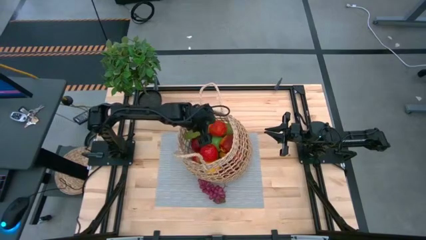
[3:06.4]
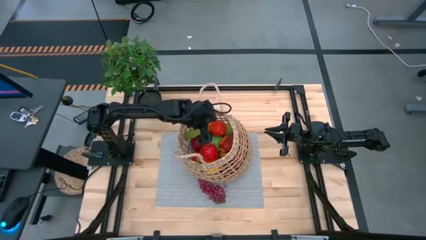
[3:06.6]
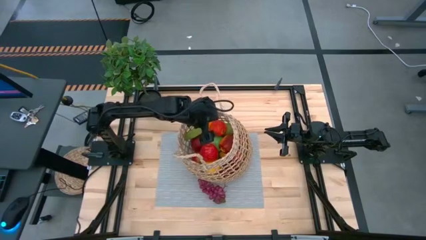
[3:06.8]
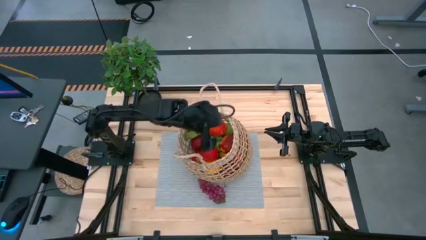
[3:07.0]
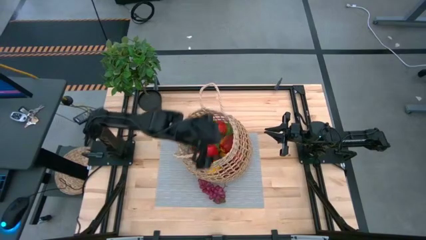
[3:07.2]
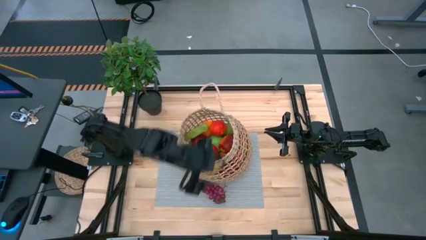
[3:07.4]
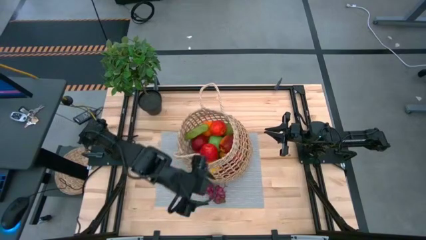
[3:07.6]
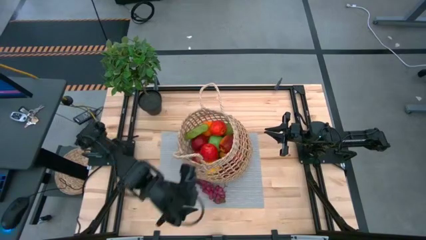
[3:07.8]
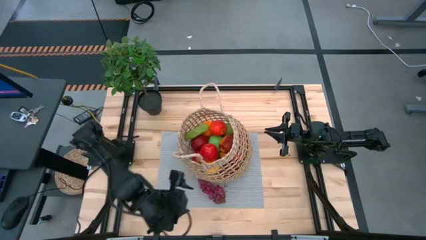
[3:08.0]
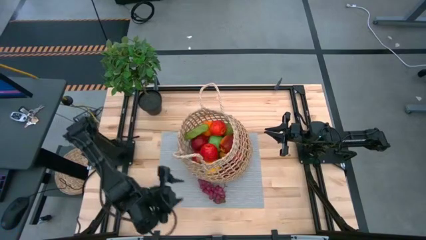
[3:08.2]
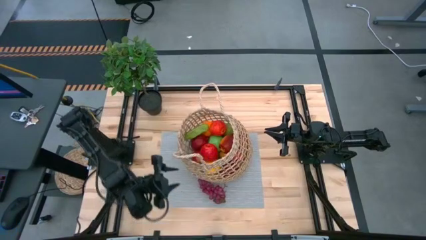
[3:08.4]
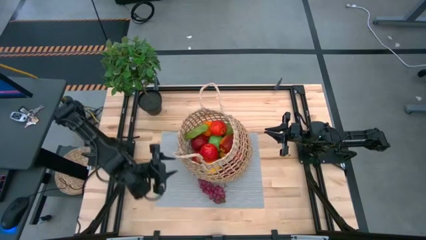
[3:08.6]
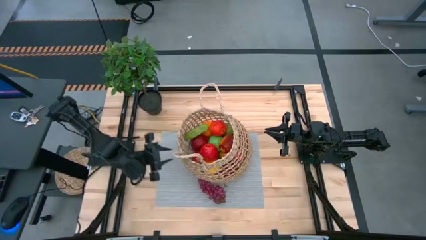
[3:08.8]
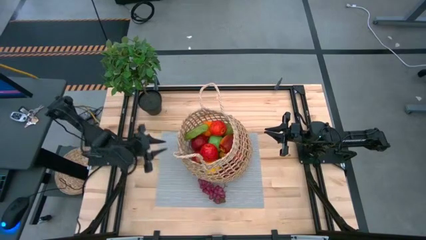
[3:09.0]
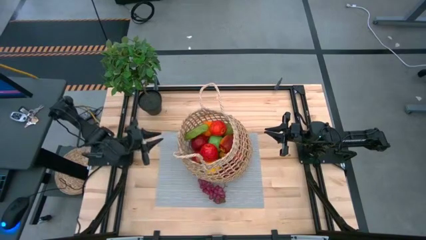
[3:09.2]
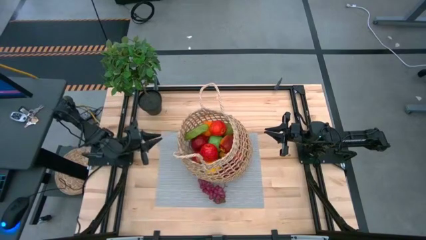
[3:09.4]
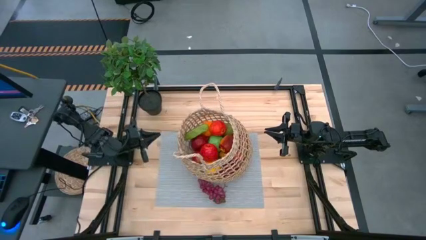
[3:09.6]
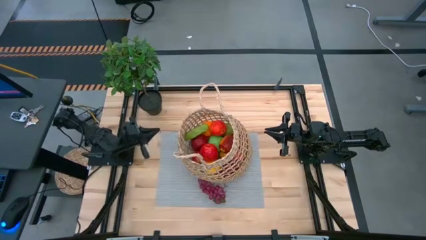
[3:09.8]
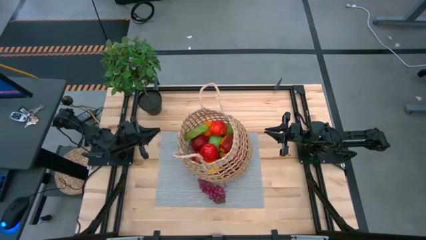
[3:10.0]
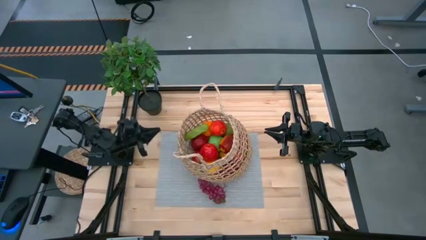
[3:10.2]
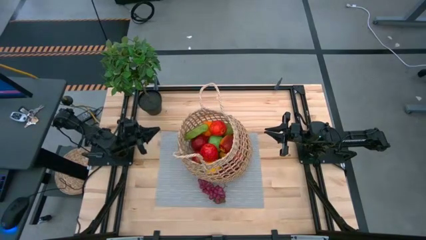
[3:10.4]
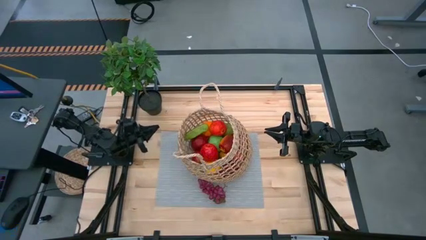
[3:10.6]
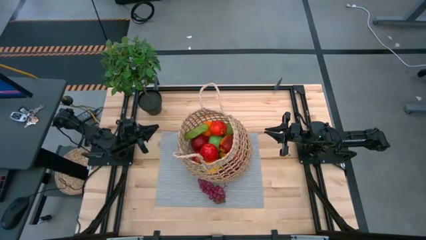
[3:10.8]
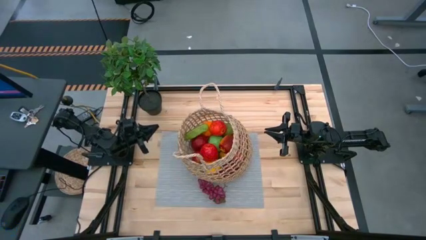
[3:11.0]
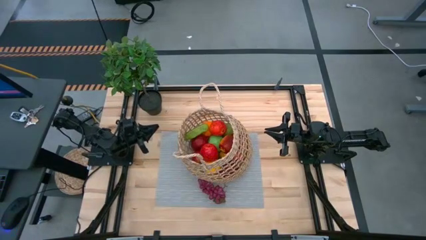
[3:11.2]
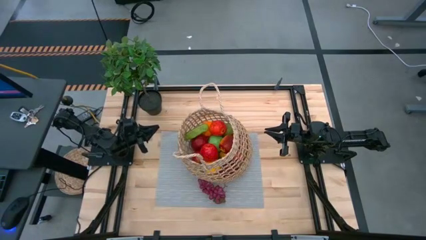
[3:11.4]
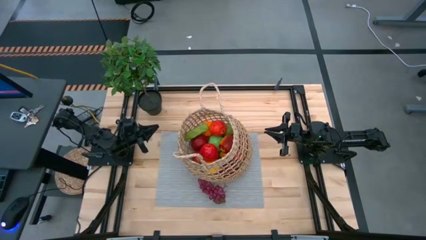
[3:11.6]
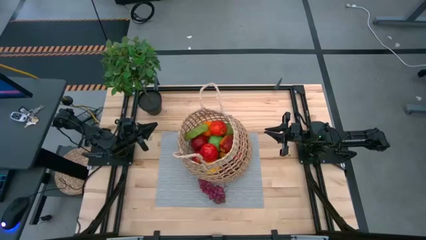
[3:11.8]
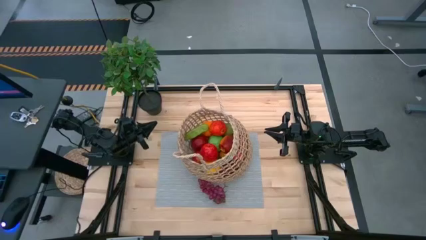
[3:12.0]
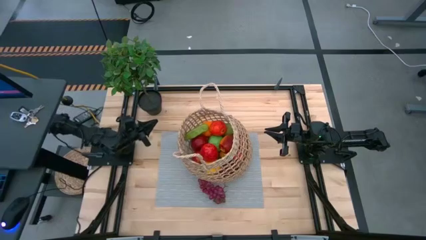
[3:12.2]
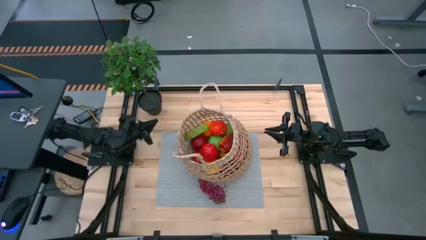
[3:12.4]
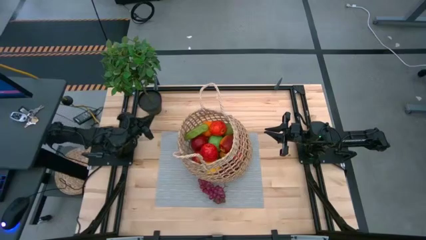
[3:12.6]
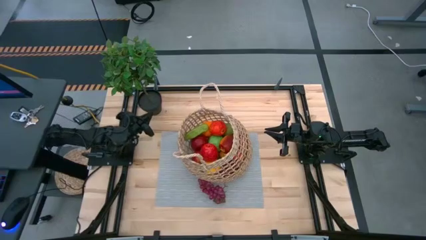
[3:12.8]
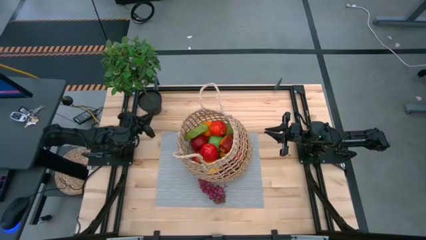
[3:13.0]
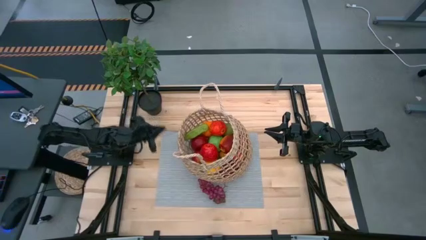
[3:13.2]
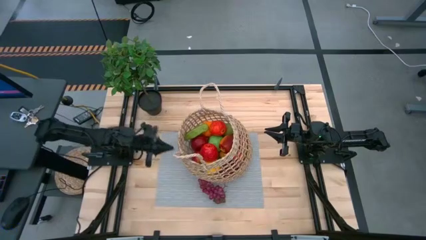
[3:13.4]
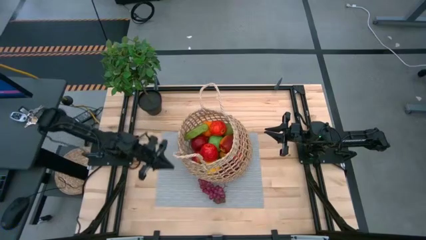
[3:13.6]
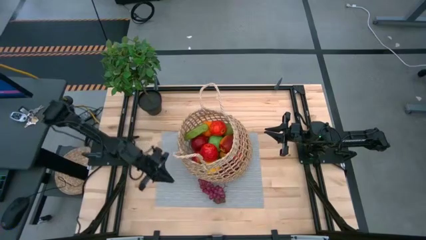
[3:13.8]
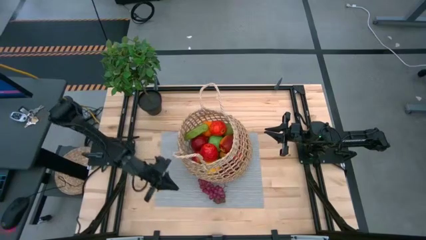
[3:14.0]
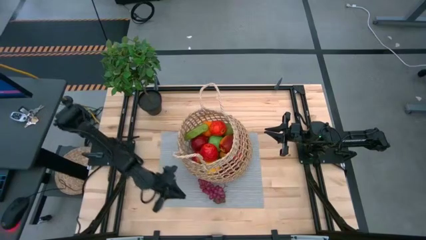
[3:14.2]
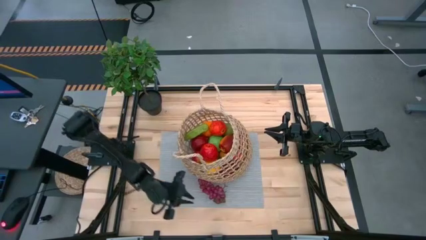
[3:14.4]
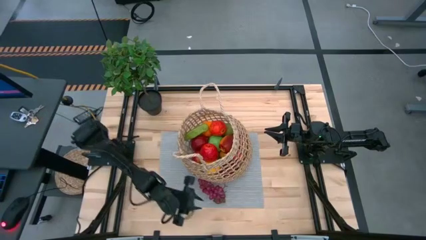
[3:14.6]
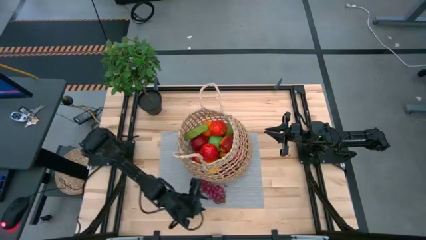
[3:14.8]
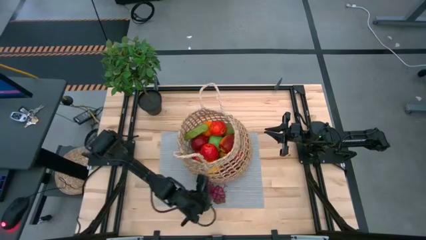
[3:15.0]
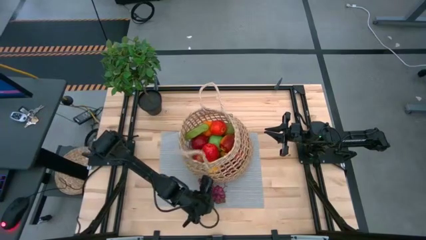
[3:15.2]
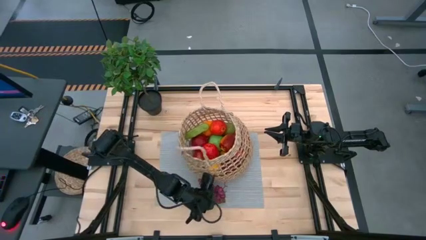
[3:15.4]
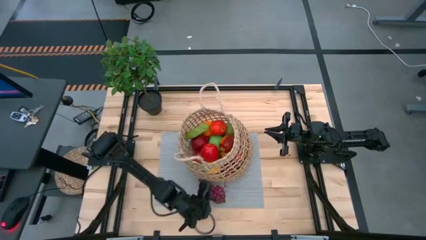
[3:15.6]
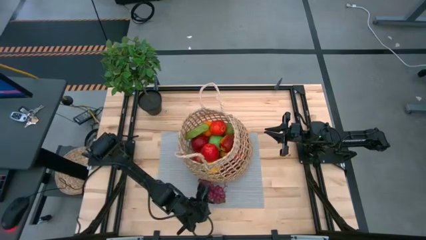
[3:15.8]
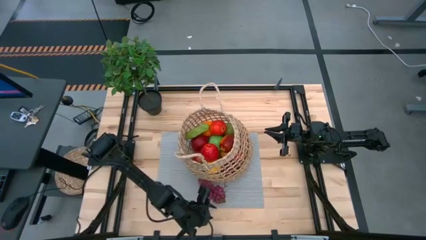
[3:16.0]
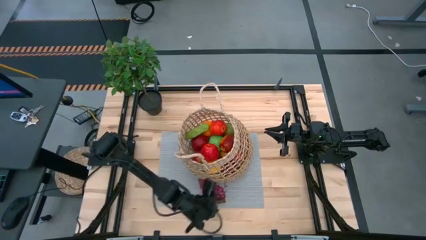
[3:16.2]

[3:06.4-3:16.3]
Task: Build produce basket
Put the grapes into the basket

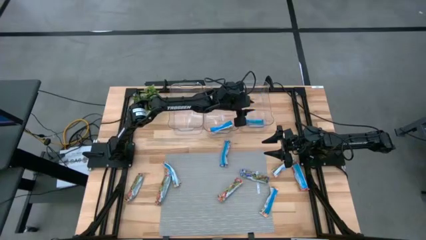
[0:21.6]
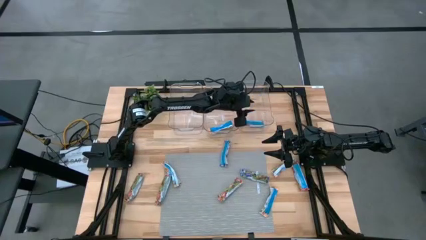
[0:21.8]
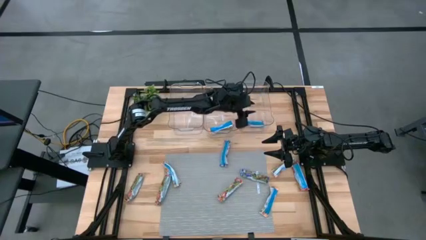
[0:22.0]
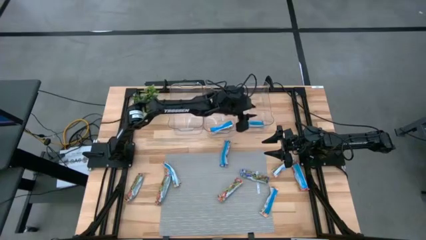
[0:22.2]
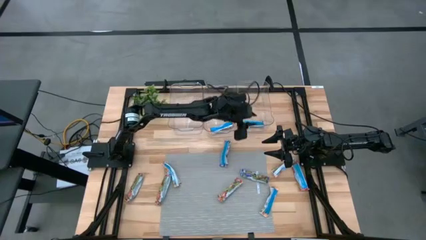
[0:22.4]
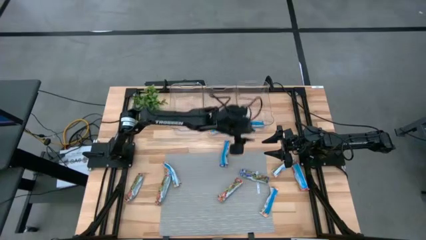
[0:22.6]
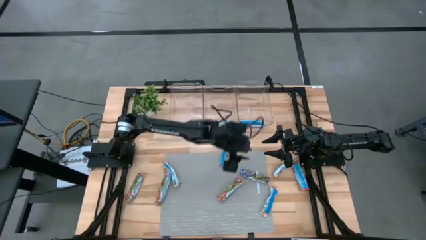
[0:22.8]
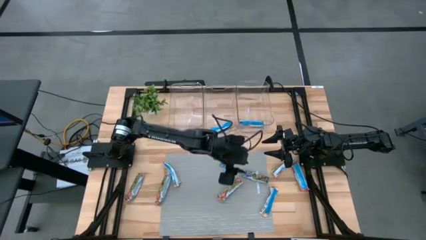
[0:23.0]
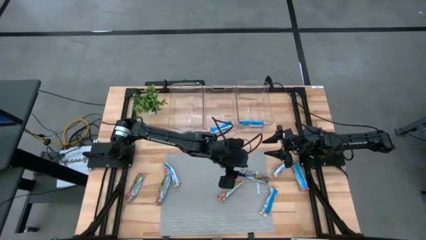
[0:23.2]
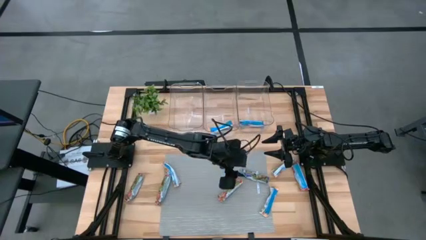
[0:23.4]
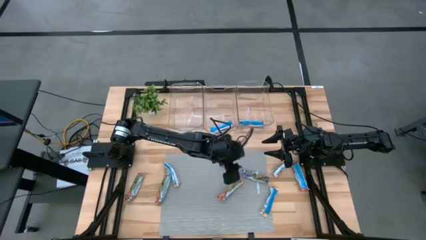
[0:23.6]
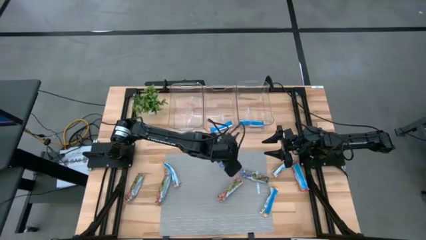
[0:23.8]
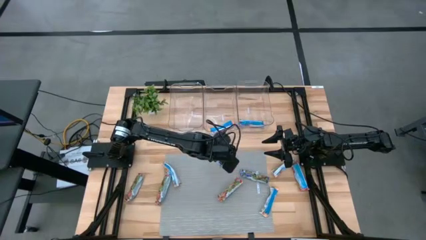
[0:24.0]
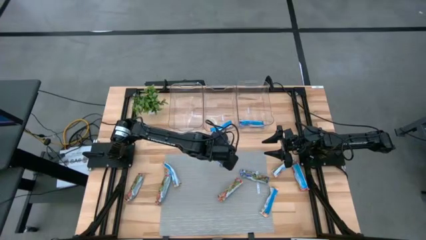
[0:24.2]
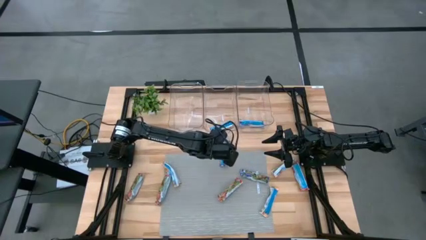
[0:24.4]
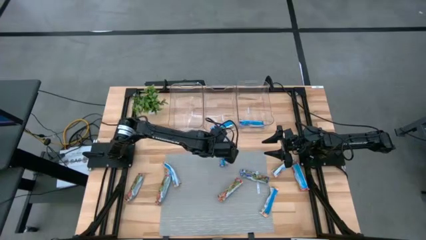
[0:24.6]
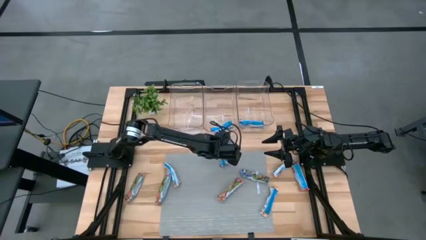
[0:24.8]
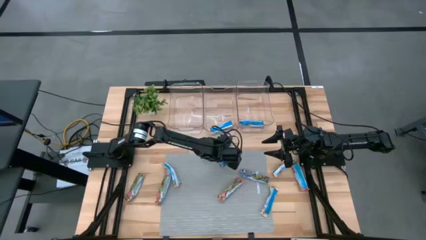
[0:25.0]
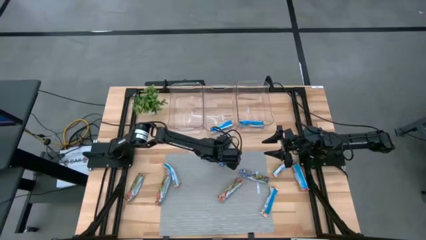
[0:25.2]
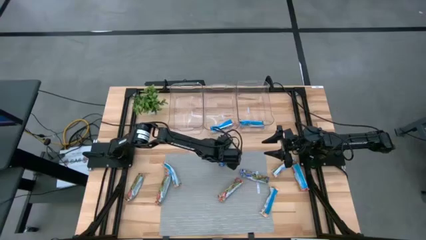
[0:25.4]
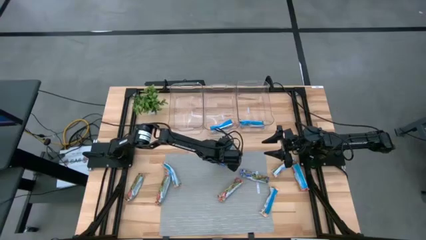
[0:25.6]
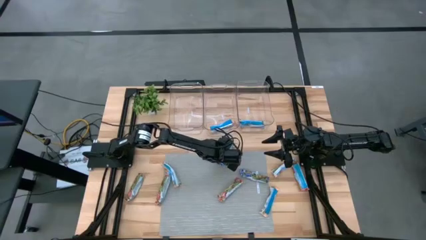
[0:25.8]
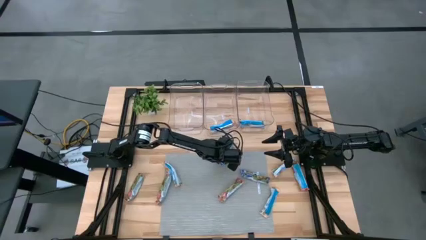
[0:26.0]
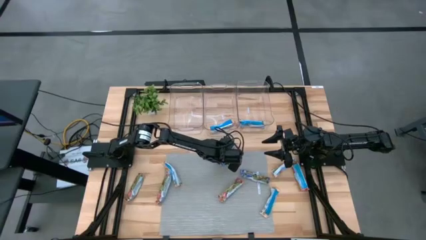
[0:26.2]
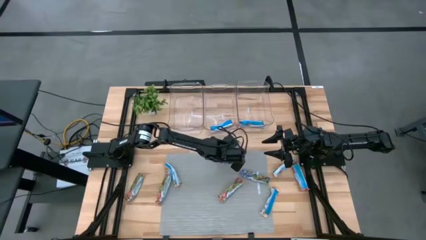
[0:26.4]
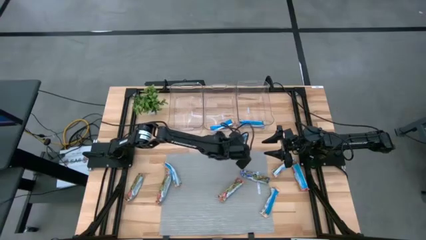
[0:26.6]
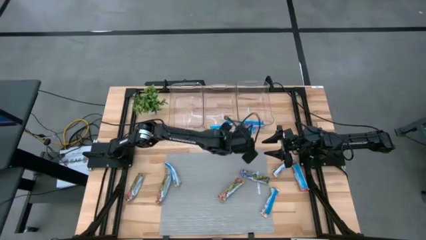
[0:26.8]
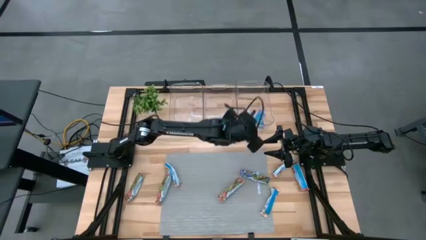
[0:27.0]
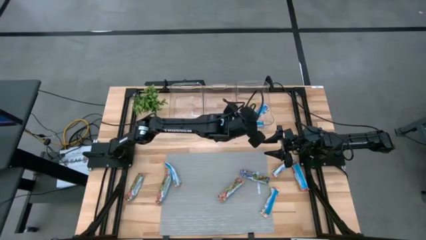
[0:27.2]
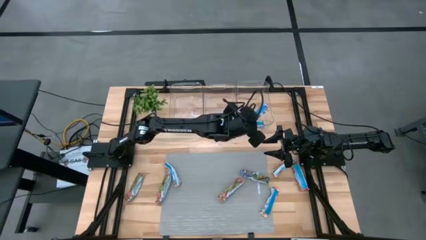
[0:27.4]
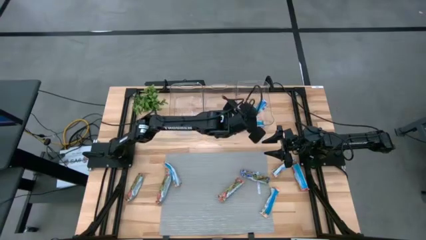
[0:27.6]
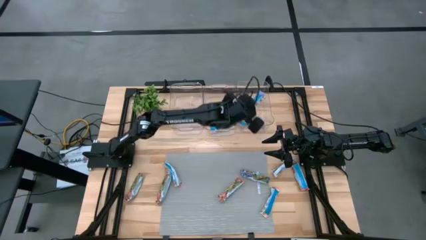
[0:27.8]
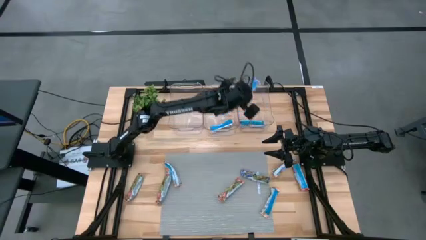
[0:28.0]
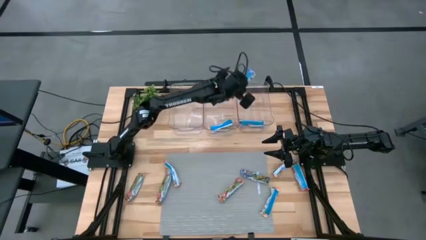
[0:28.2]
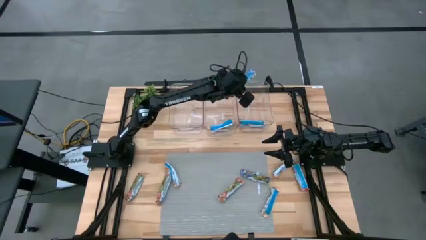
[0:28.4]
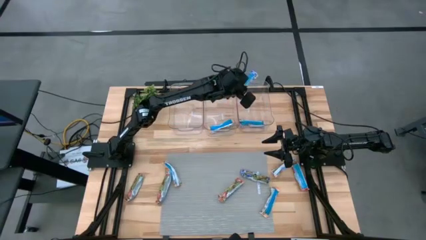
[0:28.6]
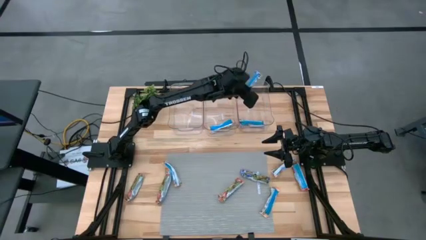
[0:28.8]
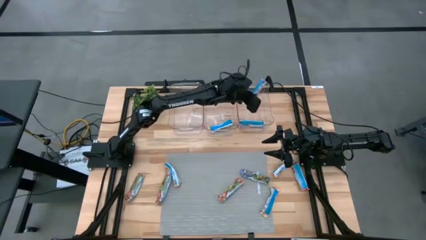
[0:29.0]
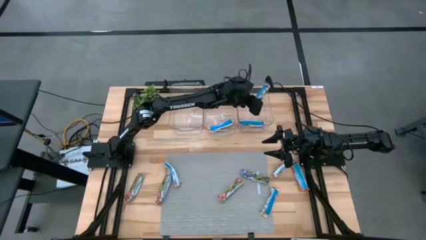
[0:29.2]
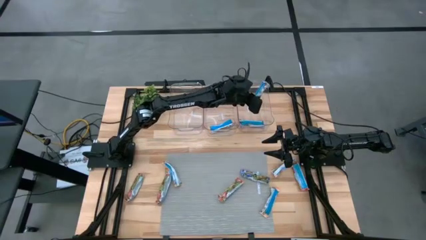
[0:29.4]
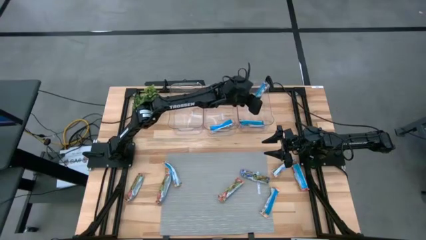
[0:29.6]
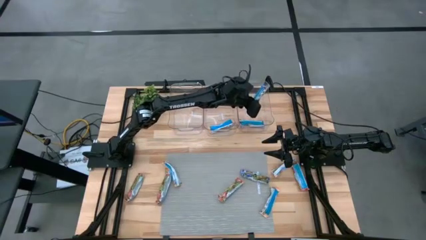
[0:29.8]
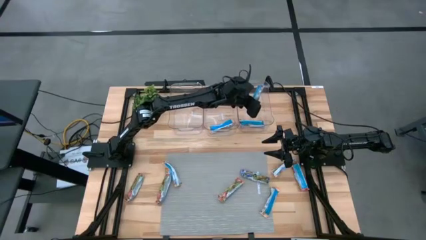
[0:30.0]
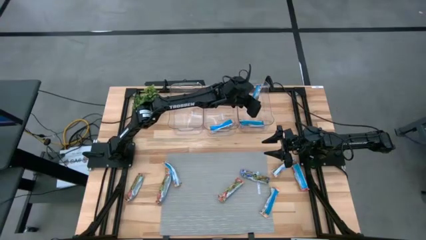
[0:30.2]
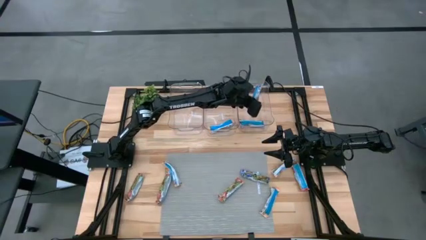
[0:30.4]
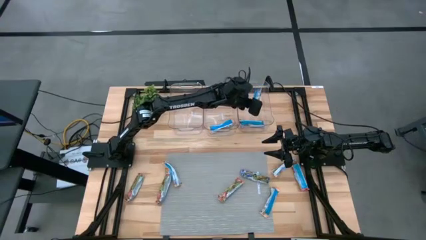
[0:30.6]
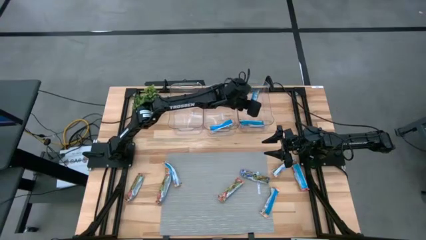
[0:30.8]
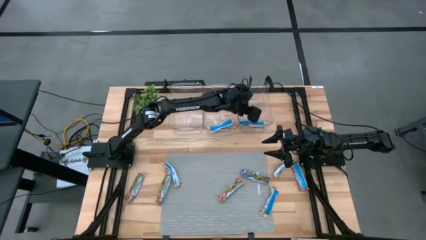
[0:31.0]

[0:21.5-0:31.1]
Task: Pick and place Granola Bars by type
Put the blue granola bar into the right transparent bin
